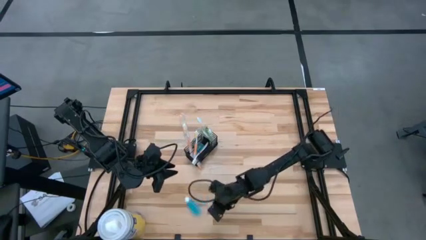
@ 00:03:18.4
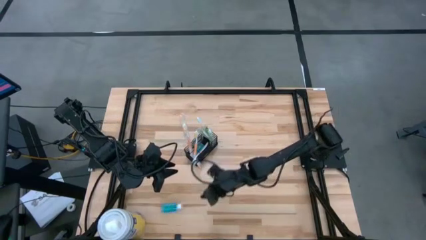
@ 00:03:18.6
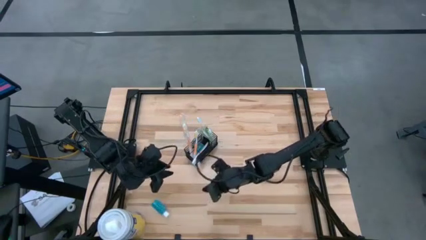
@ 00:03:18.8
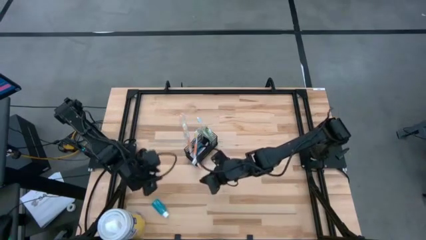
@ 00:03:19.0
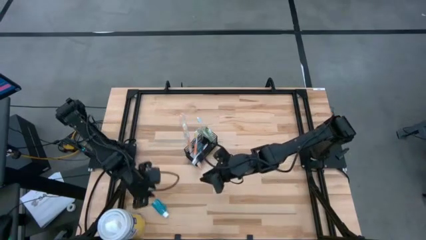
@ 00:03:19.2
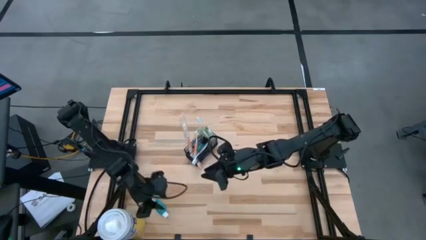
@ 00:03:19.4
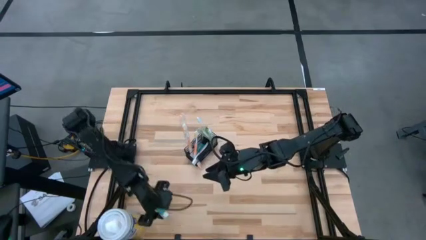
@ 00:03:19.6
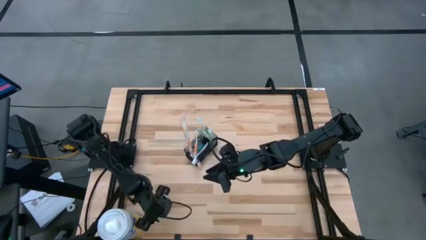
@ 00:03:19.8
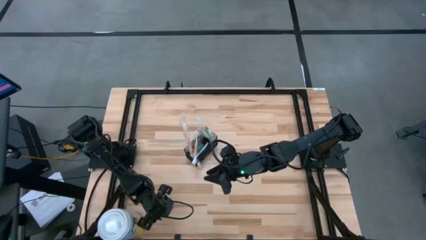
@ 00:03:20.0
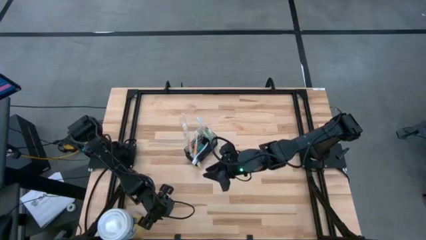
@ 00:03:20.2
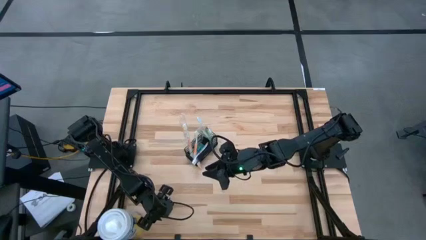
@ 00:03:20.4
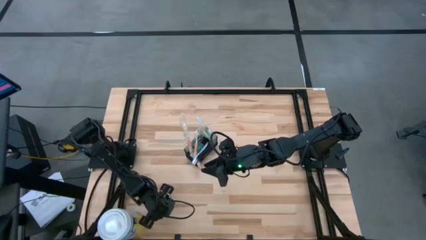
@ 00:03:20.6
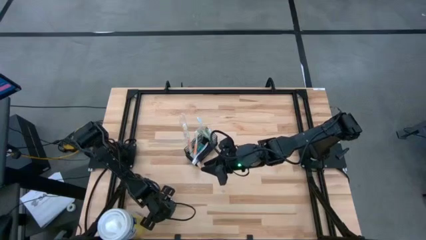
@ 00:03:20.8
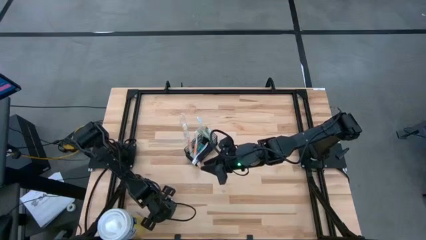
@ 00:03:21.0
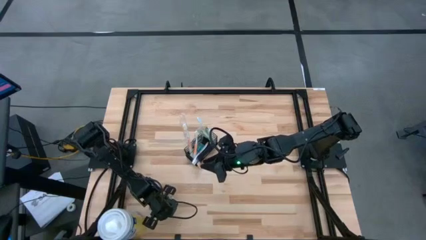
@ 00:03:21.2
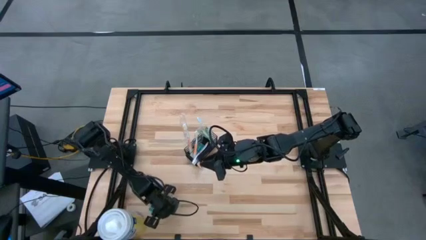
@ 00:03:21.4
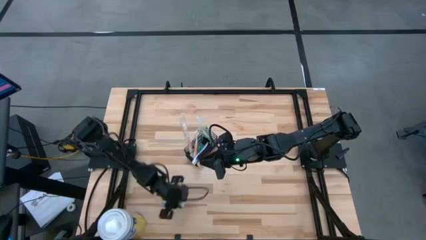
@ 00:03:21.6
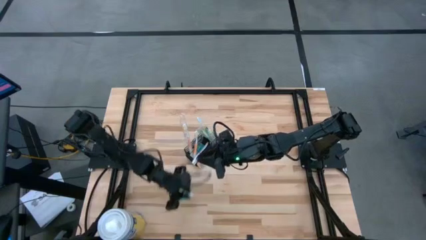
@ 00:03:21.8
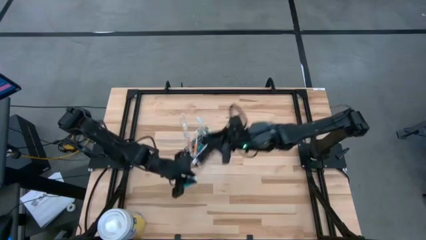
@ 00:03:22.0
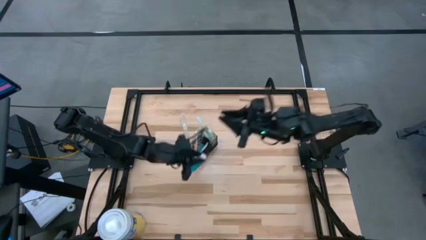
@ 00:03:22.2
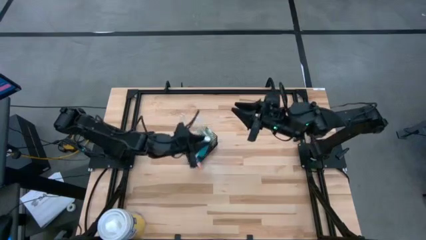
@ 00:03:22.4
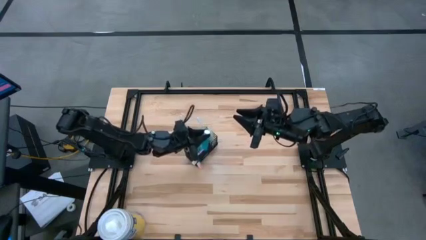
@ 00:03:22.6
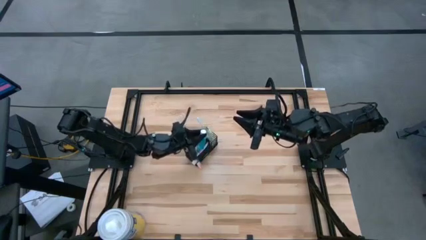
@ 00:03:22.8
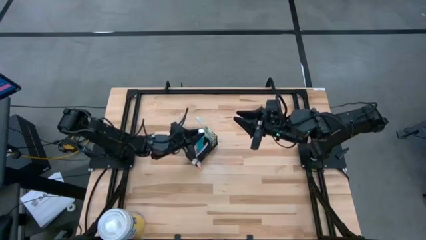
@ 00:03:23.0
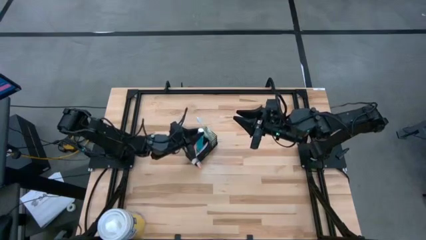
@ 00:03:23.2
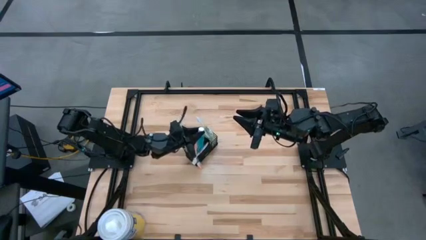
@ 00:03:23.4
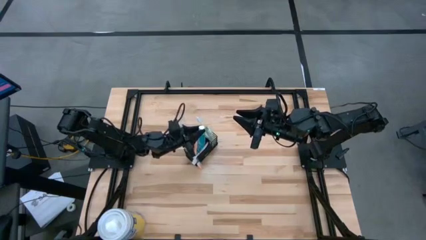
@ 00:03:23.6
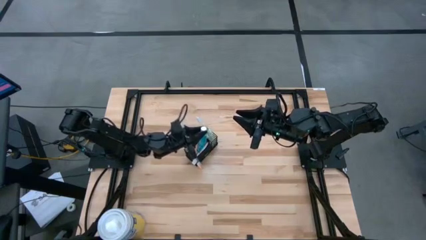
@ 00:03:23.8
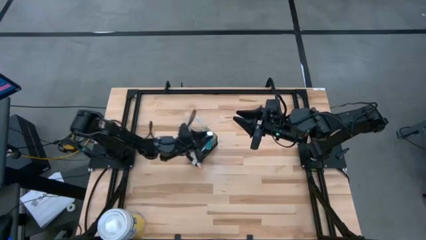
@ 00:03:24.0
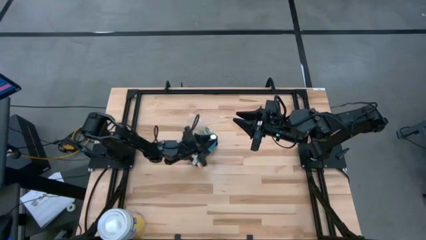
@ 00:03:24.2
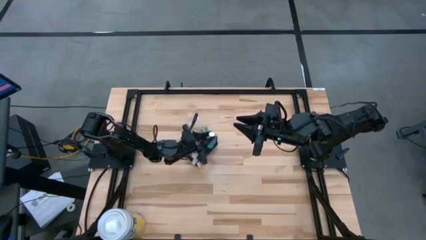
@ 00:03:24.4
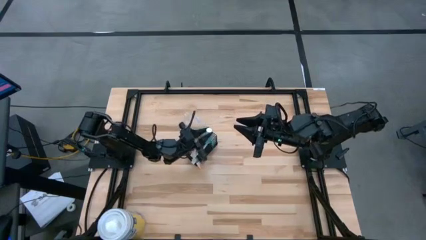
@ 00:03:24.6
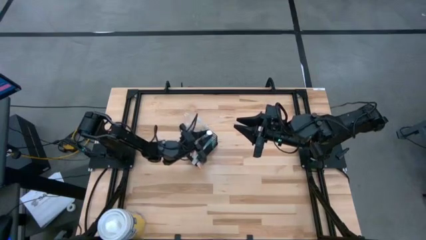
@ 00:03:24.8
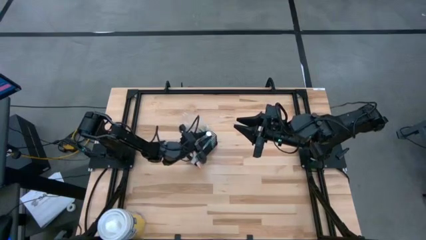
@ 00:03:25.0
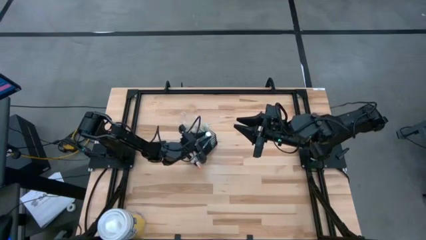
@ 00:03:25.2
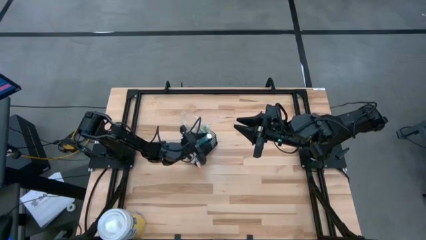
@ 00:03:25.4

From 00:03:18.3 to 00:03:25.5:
Task: Pick & Place toothbrushing station
Put the blue mouthwash into the wire organizer

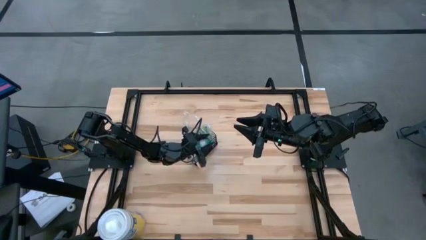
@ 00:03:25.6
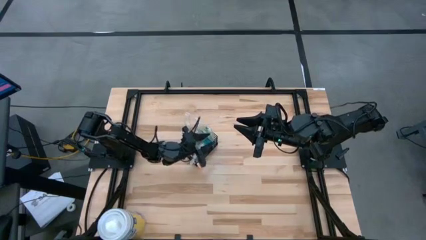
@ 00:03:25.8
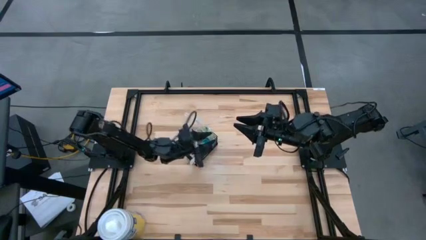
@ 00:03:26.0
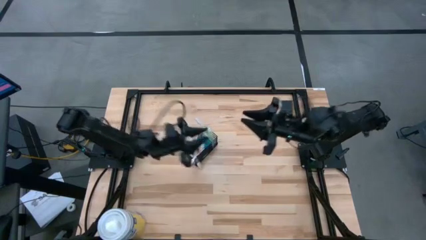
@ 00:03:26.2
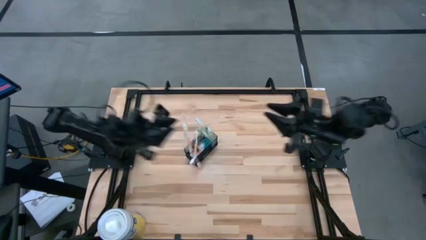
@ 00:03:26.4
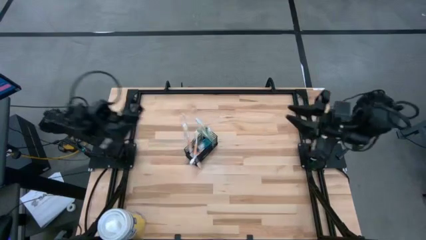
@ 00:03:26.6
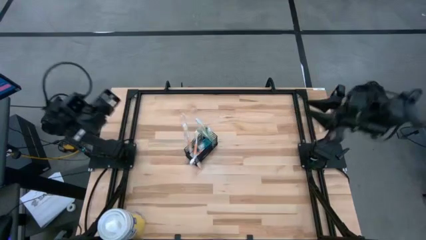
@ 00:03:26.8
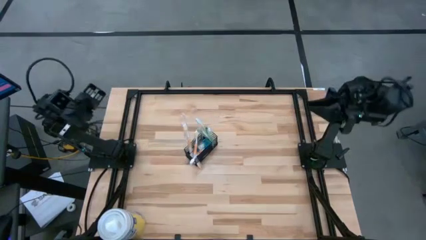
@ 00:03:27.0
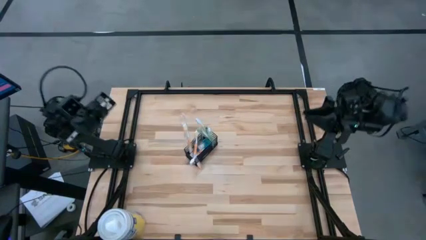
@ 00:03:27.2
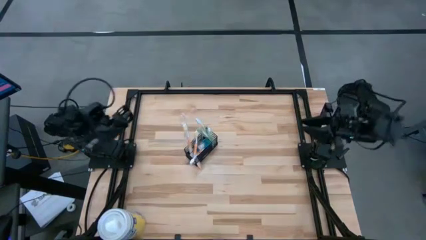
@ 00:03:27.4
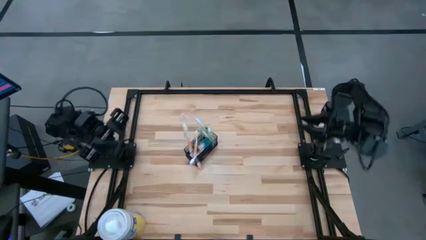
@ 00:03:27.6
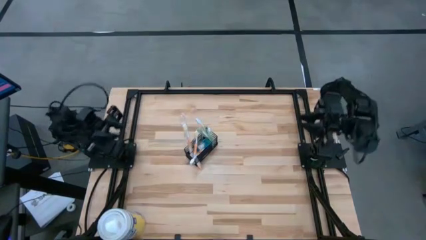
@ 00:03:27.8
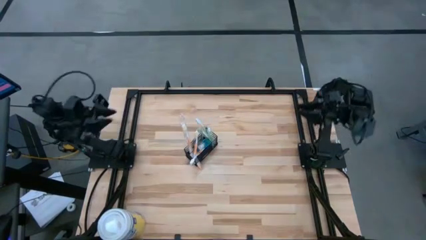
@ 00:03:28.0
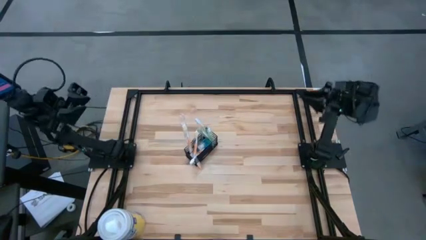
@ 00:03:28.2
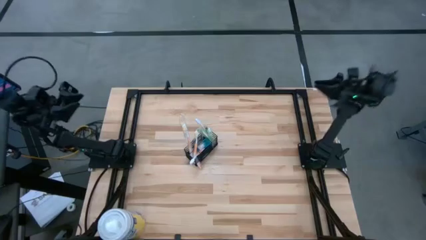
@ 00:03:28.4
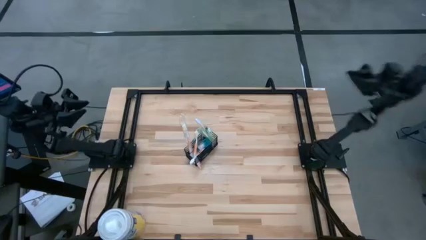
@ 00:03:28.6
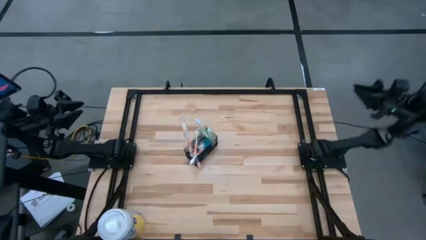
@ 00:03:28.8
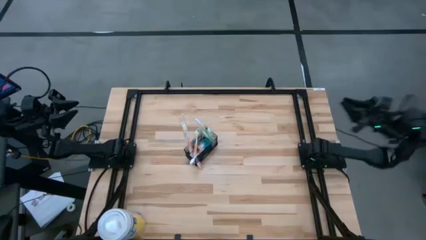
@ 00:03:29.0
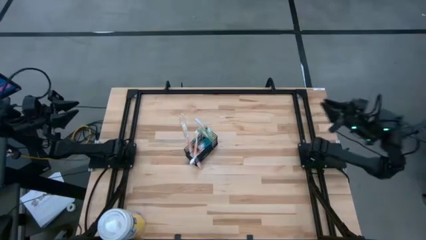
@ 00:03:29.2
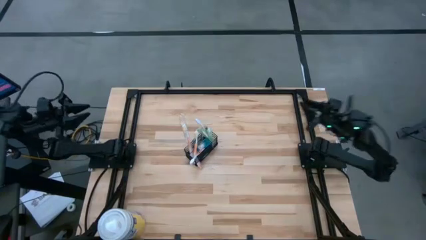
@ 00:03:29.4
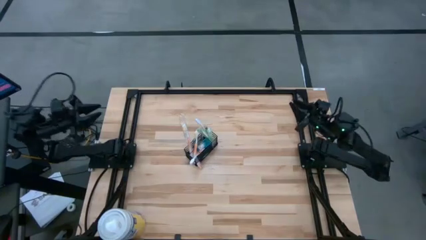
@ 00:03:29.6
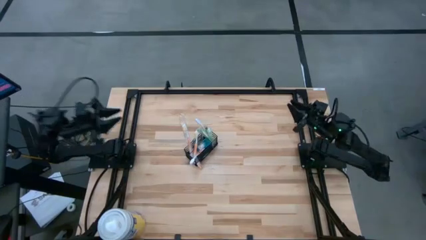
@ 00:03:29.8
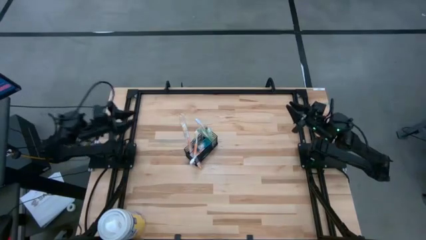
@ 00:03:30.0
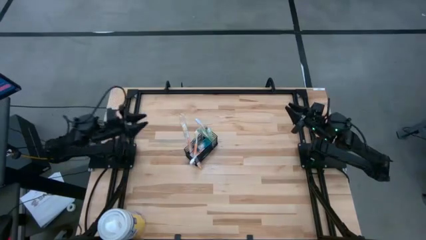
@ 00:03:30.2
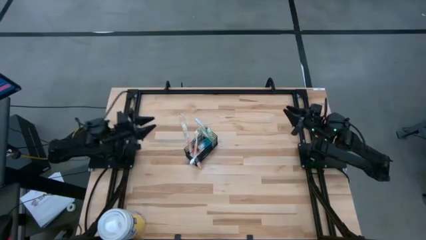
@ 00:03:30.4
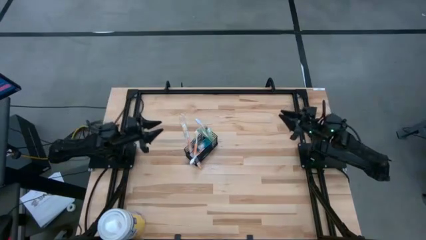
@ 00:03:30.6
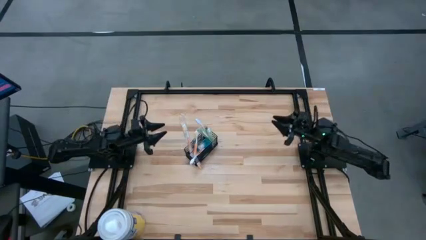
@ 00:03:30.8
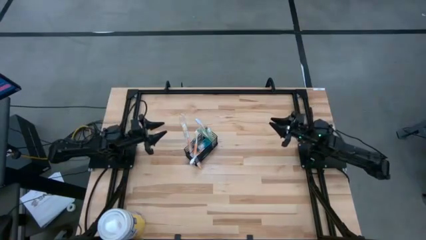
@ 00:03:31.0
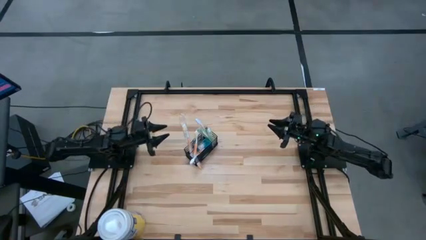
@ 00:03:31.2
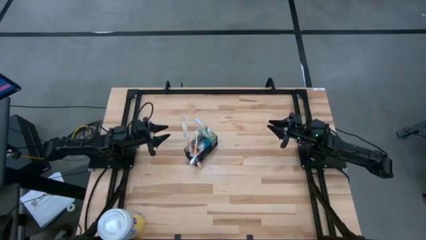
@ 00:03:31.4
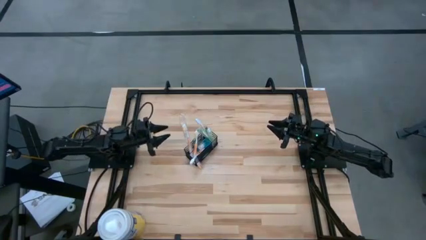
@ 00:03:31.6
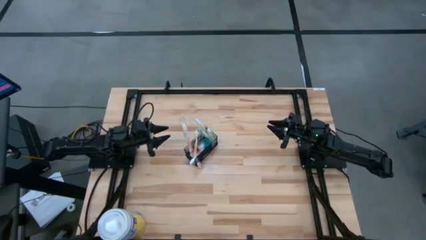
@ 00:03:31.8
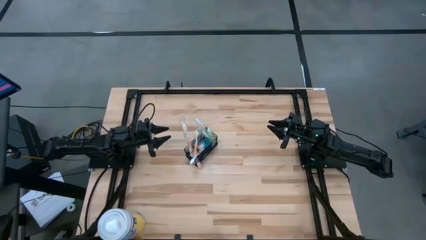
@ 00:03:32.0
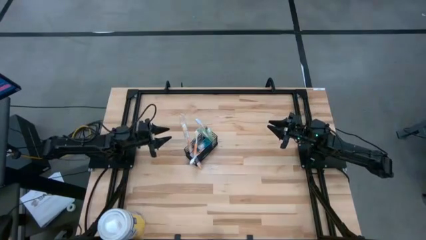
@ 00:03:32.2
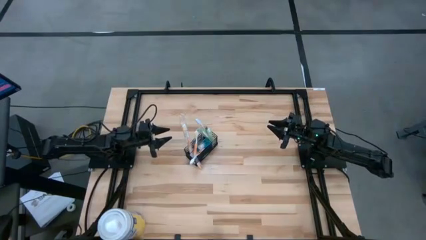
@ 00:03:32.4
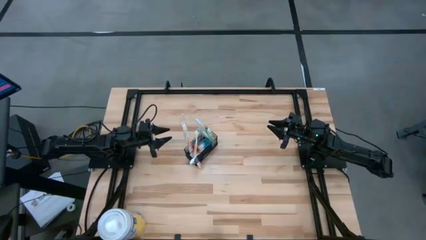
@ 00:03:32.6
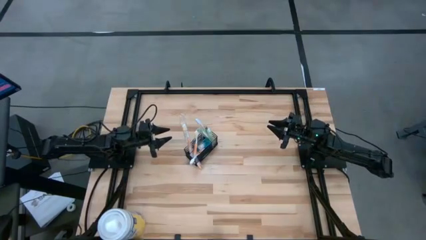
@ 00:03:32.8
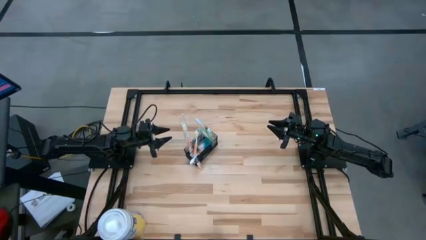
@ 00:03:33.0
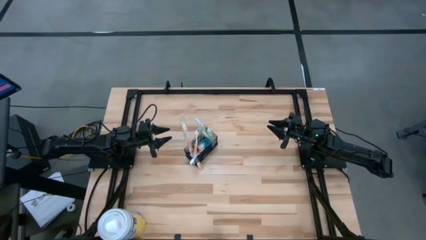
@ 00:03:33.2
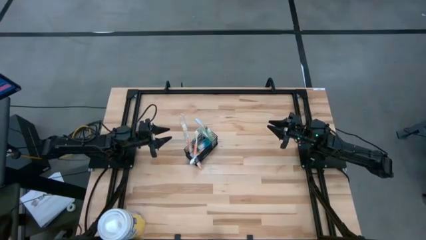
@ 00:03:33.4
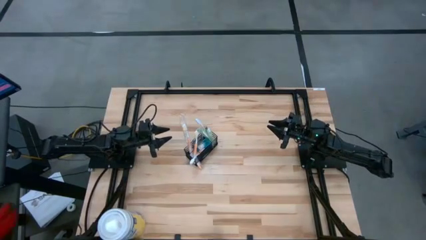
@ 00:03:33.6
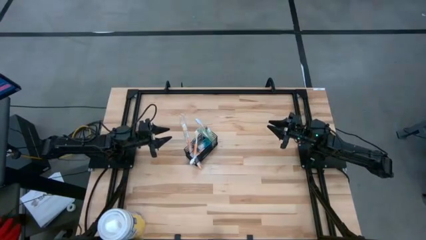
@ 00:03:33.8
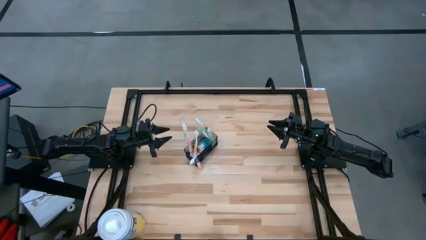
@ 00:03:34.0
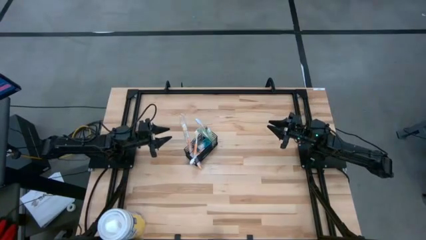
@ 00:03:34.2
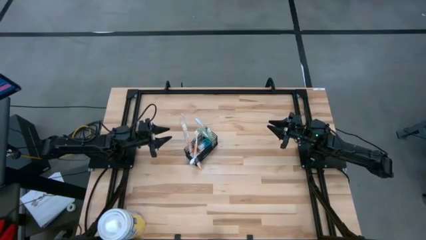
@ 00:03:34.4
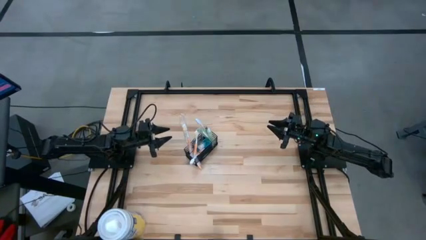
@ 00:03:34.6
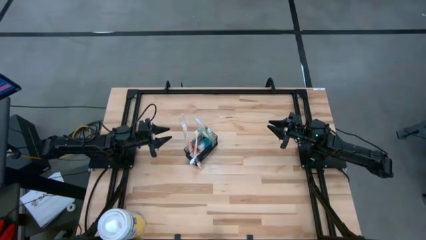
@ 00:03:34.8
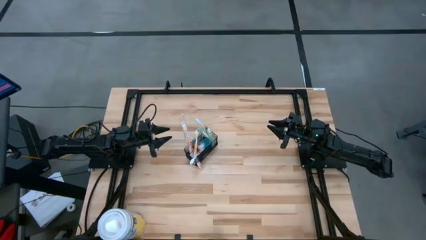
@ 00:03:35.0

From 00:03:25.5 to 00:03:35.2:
Return to Home Position
